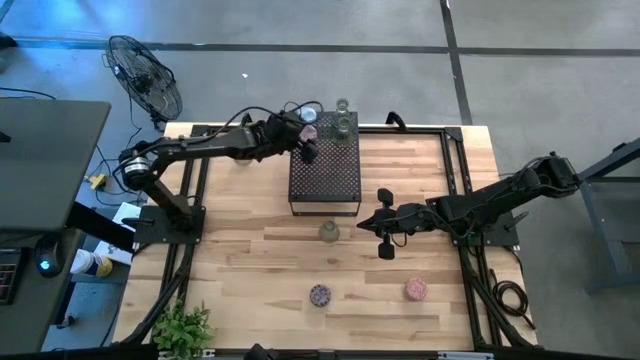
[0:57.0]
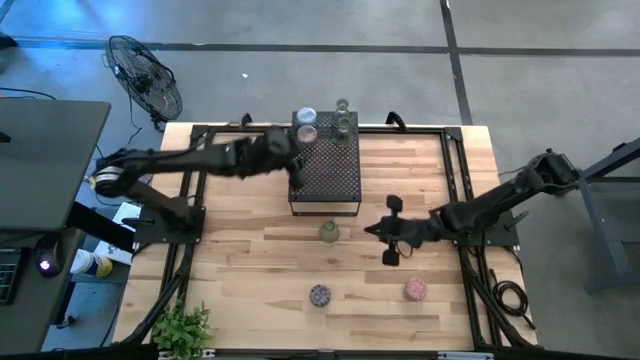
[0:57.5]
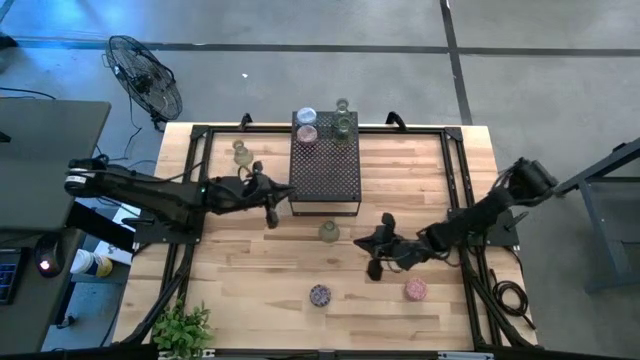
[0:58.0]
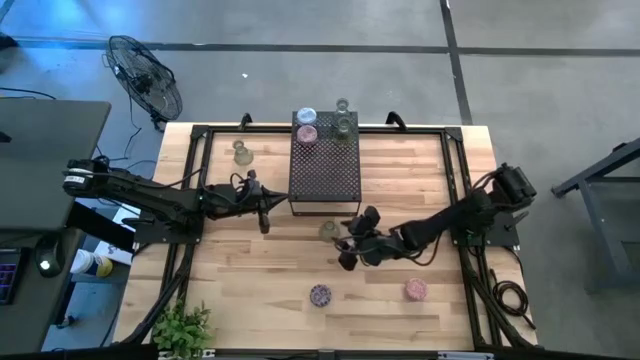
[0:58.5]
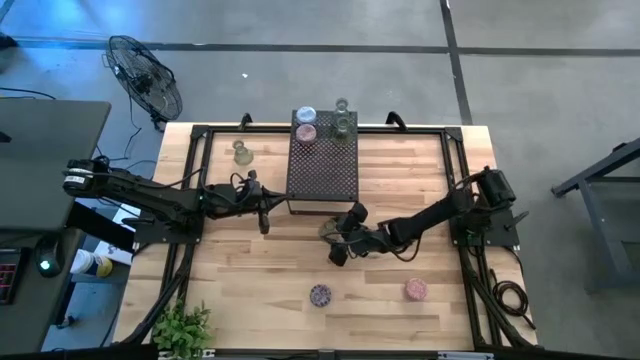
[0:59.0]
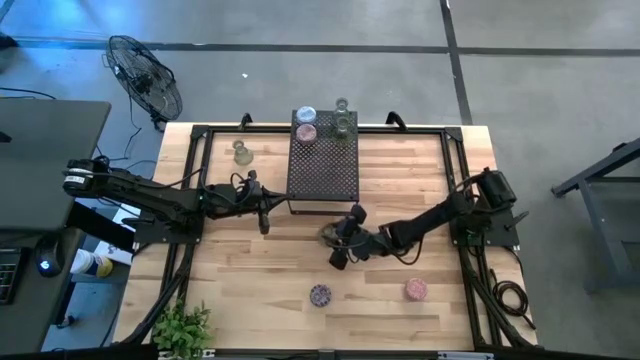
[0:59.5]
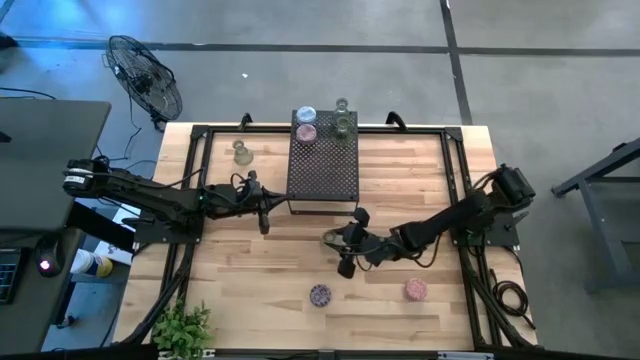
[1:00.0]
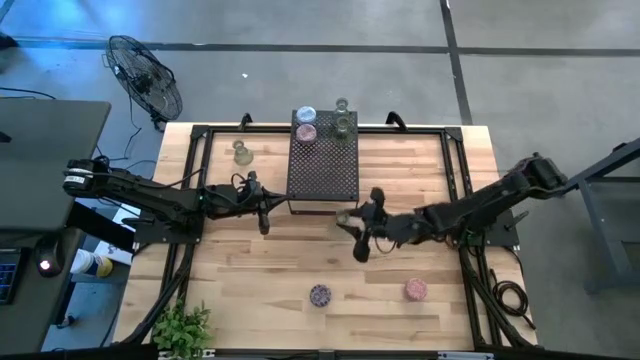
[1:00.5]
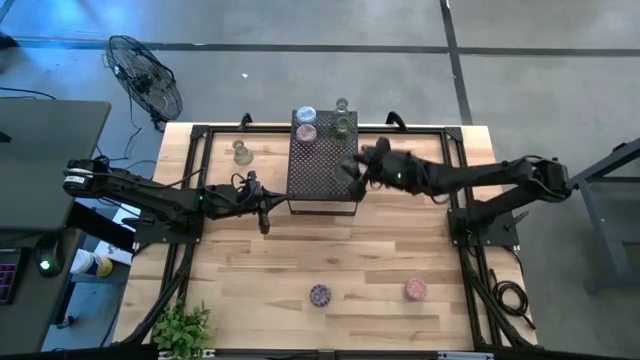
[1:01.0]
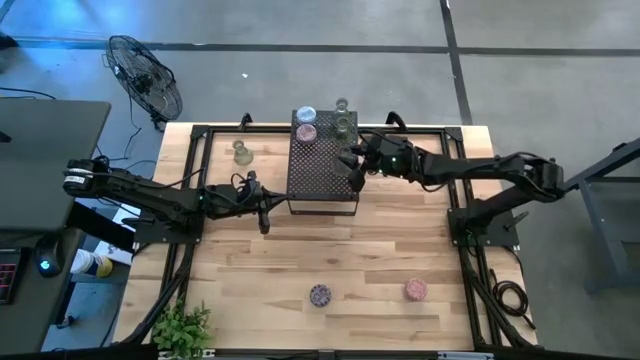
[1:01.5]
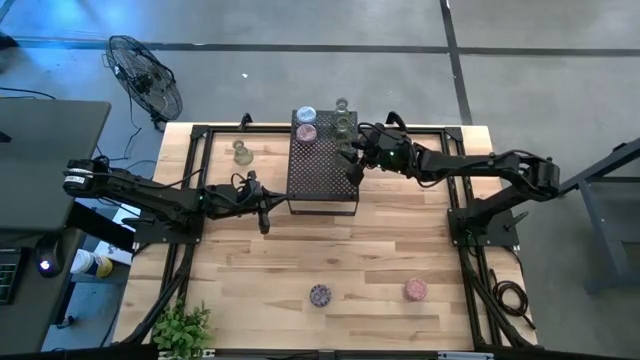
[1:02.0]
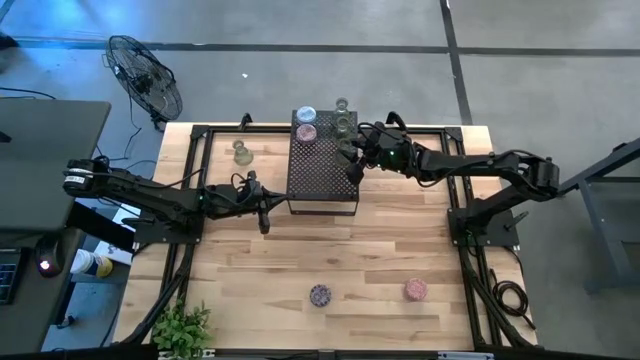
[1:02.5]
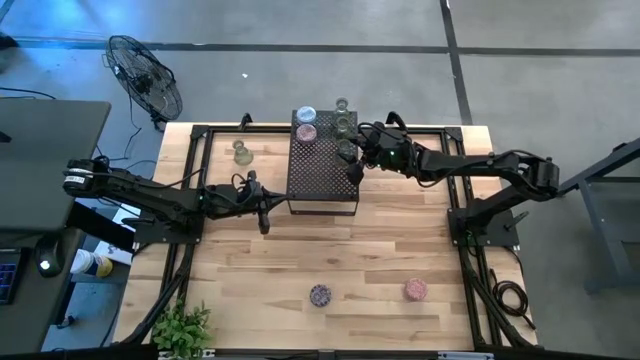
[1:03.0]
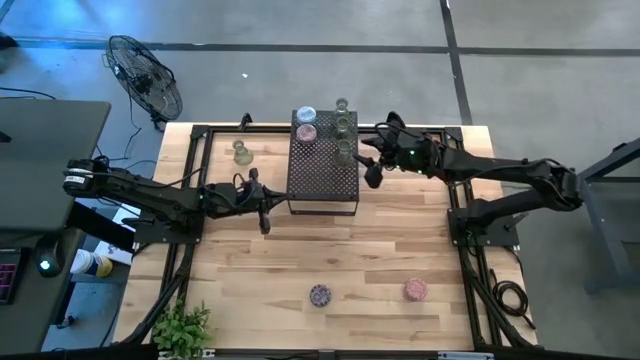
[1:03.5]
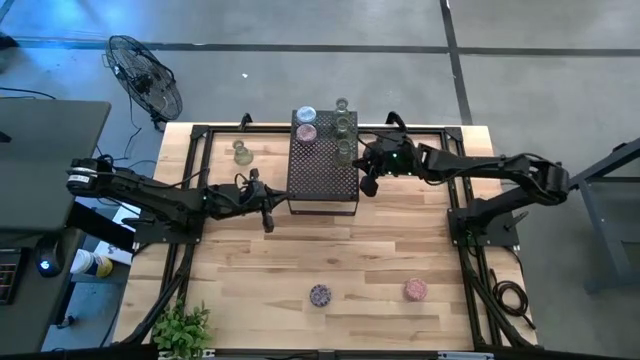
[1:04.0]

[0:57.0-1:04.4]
Task: Pick & Place candle stick holders
Put the green glass candle holder on the shelf aligned with the other green glass candle holders

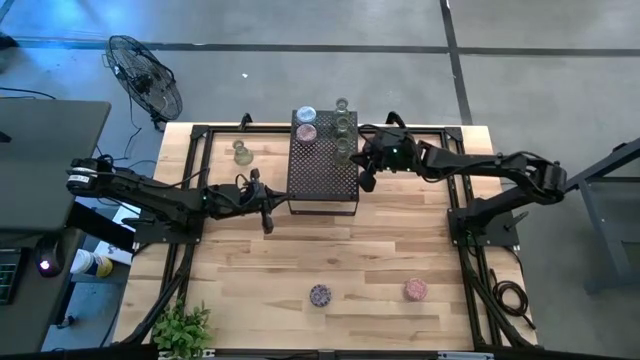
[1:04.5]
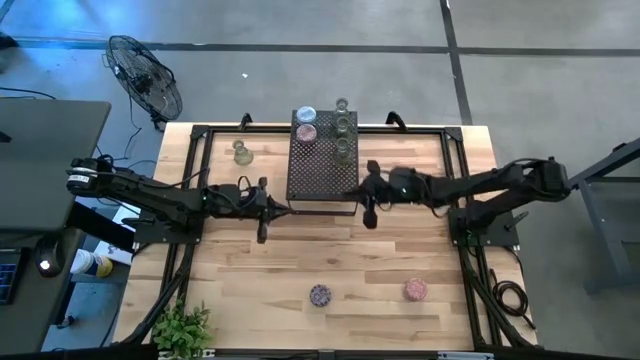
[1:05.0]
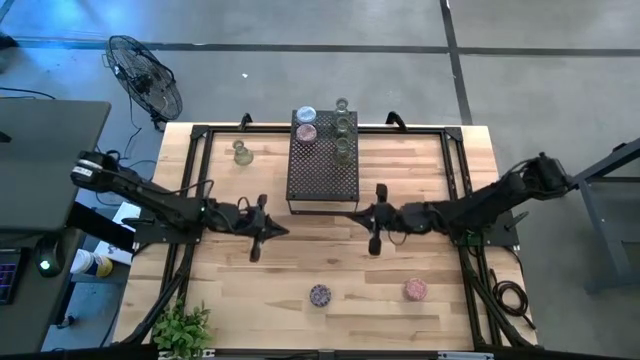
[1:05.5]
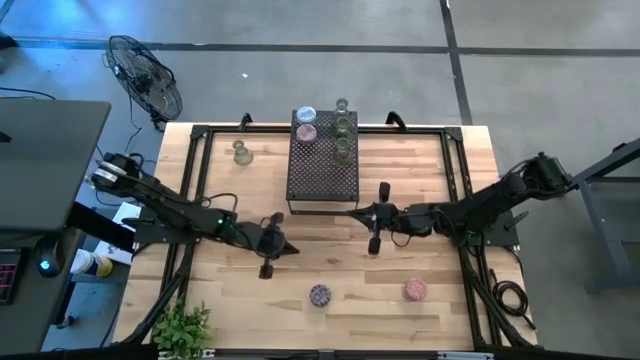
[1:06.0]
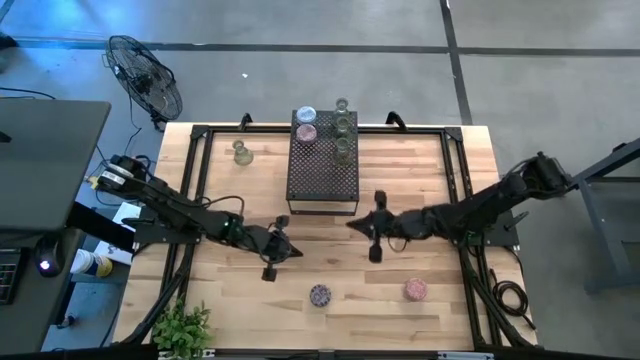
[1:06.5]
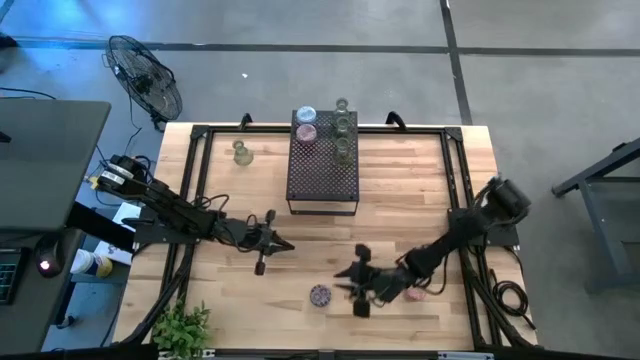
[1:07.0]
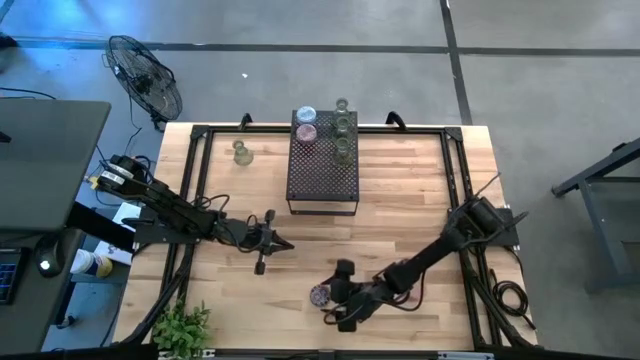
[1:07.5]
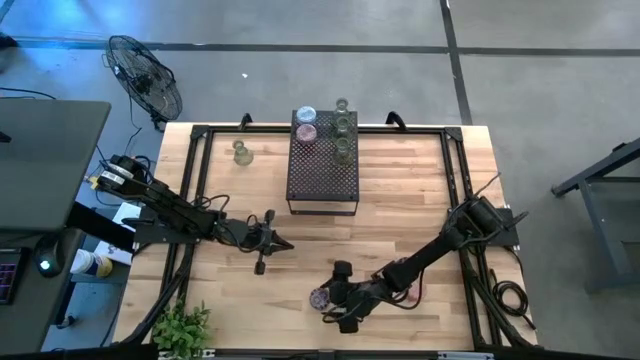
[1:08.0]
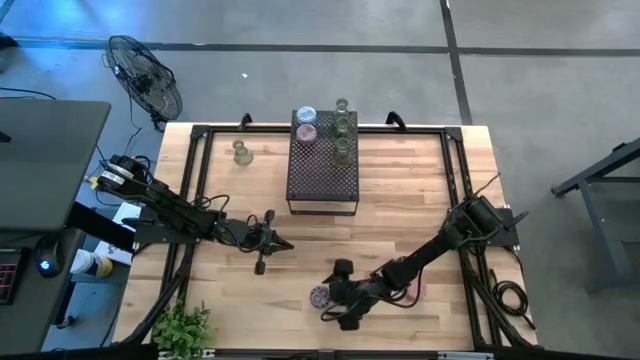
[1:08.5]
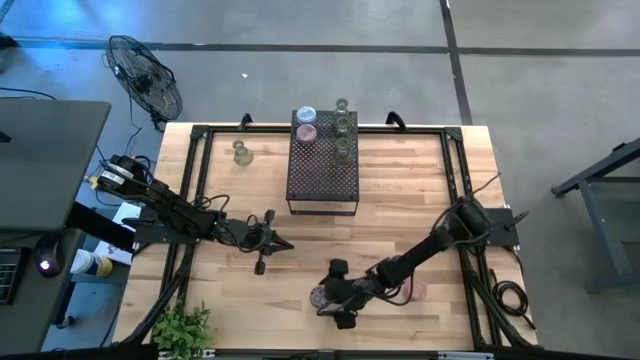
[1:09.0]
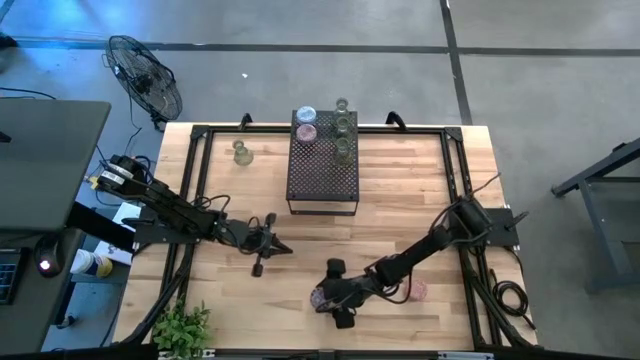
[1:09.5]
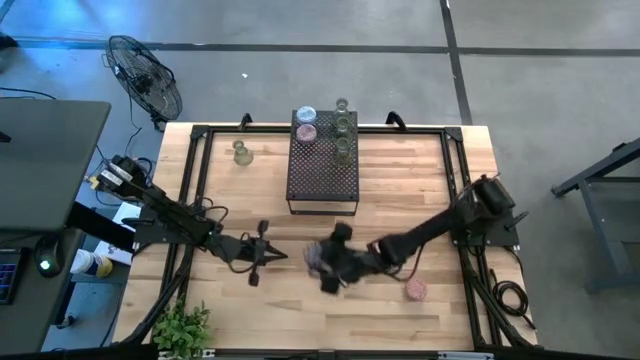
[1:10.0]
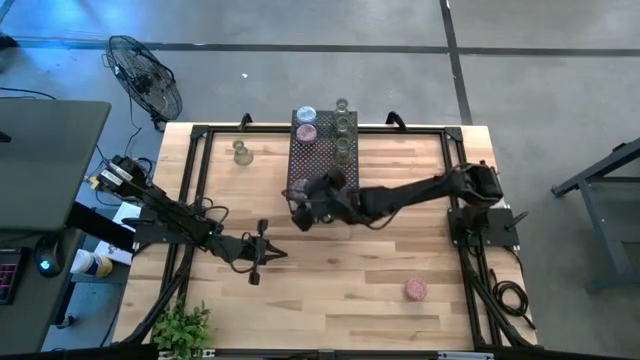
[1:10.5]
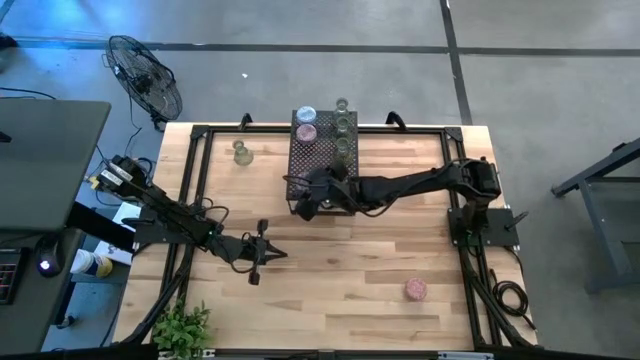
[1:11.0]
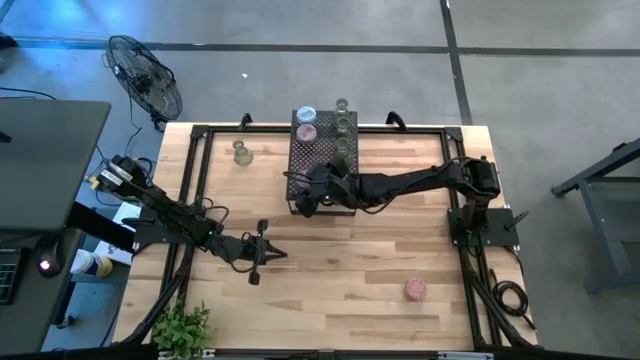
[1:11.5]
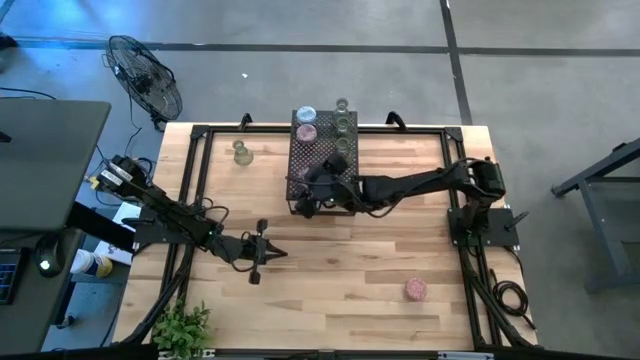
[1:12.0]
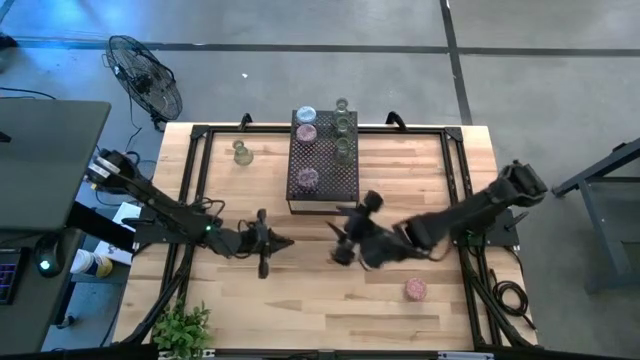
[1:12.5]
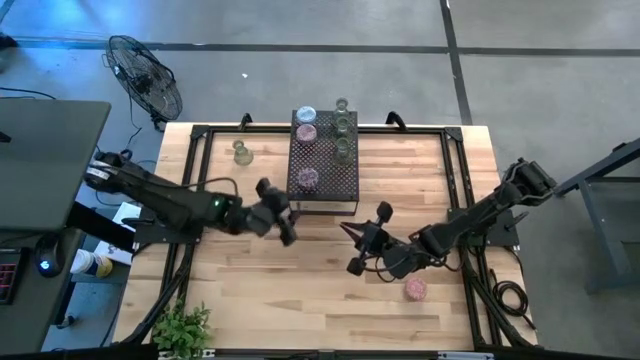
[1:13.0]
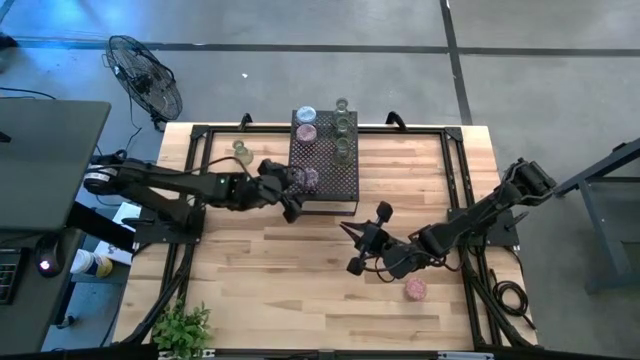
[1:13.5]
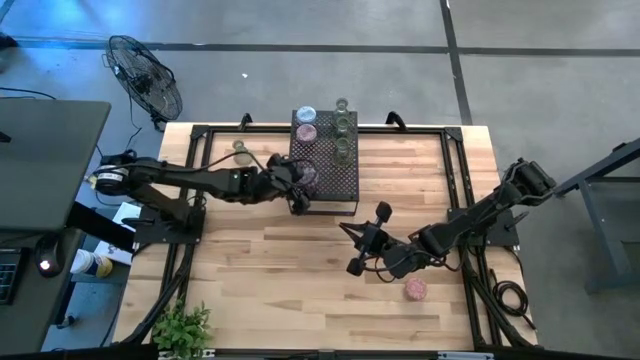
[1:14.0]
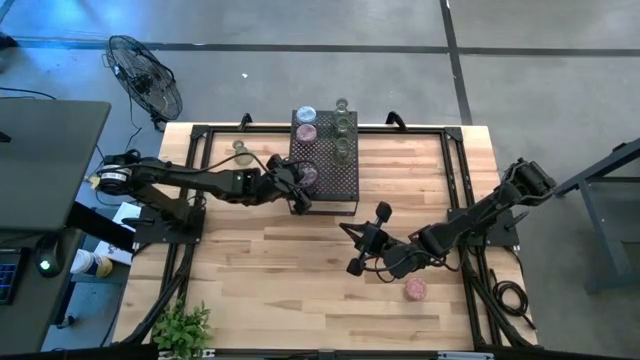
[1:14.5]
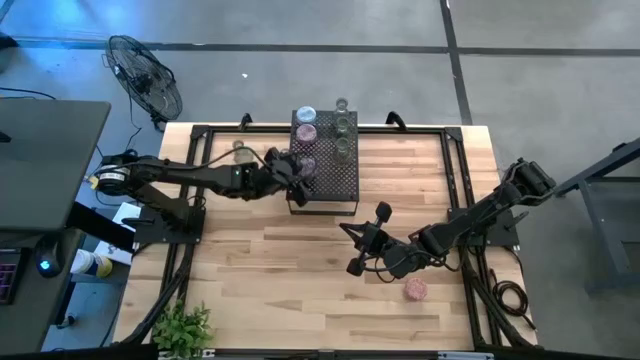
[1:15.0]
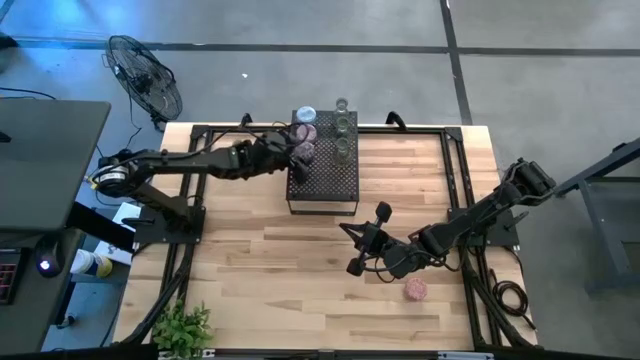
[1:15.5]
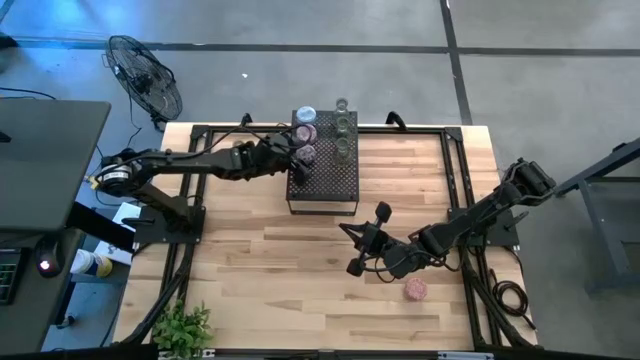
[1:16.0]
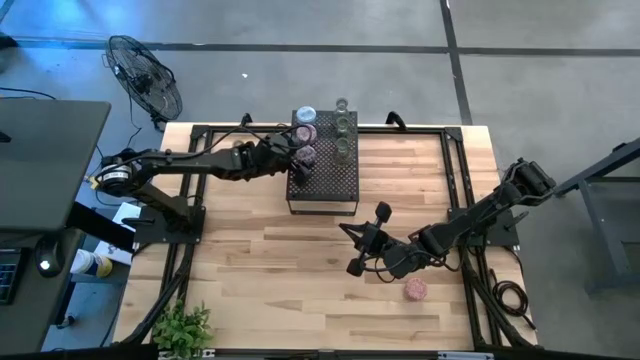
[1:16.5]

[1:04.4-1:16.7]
Put the black scented candle on the shelf aligned with the other red scented candle
